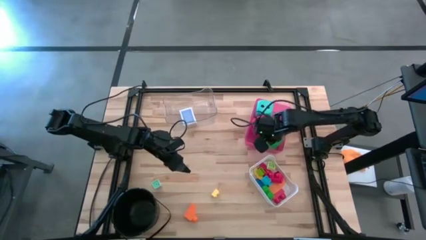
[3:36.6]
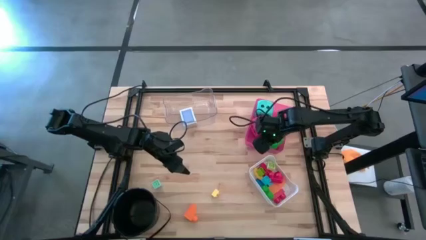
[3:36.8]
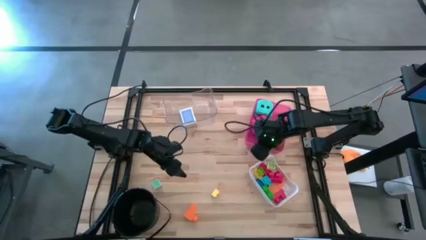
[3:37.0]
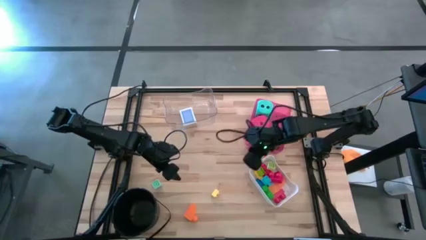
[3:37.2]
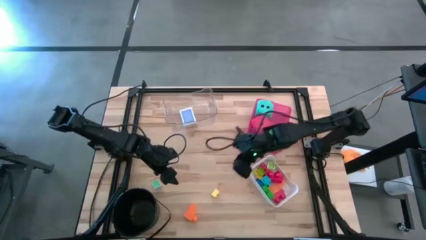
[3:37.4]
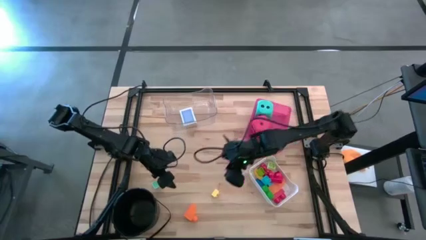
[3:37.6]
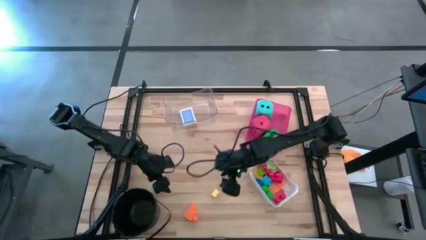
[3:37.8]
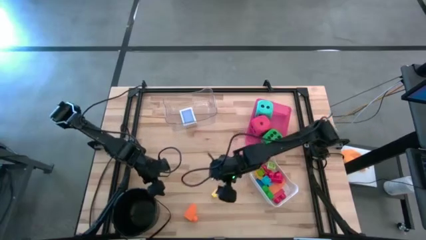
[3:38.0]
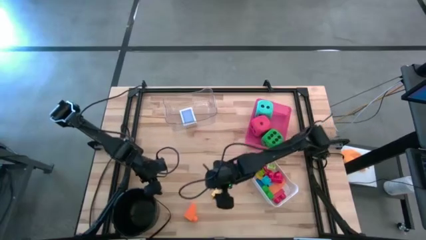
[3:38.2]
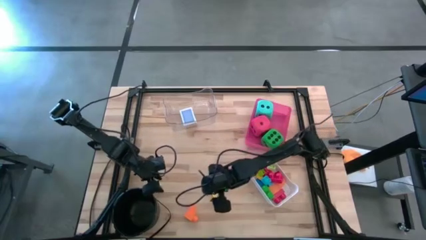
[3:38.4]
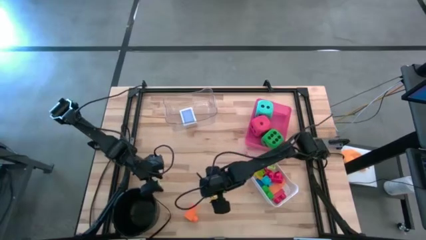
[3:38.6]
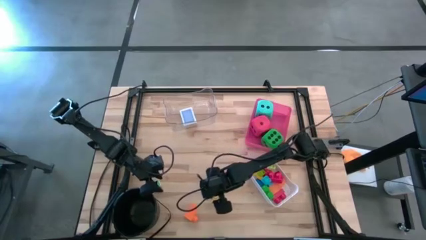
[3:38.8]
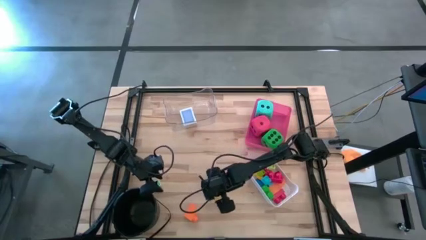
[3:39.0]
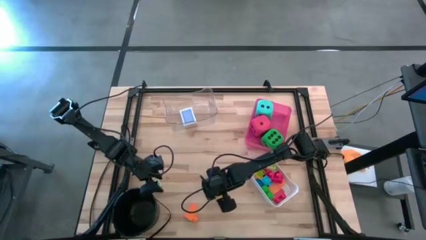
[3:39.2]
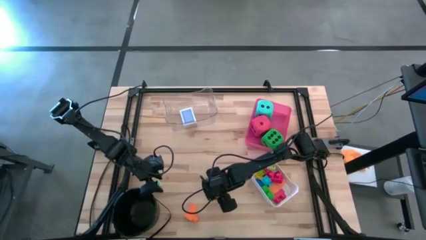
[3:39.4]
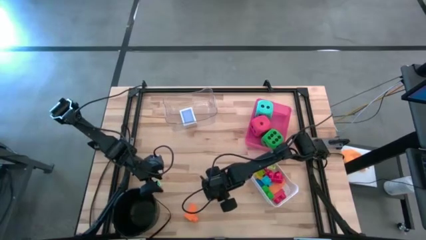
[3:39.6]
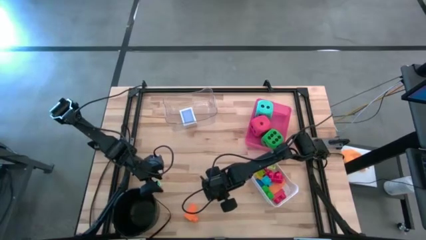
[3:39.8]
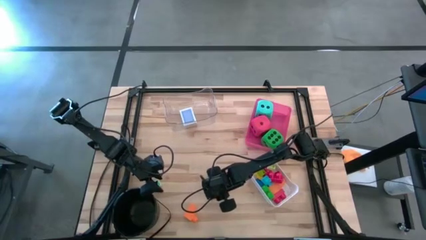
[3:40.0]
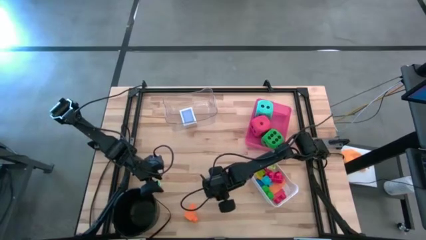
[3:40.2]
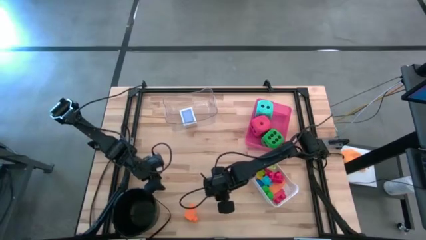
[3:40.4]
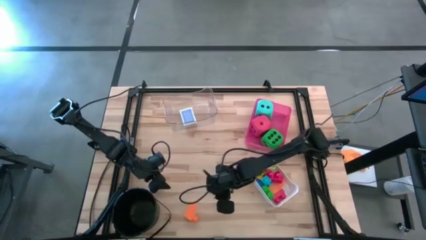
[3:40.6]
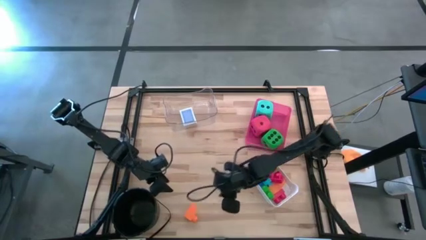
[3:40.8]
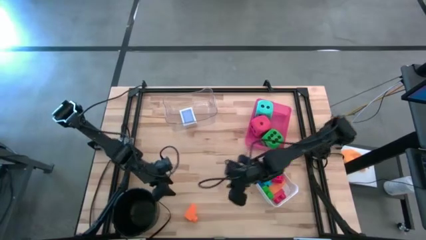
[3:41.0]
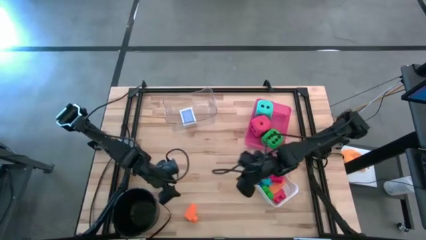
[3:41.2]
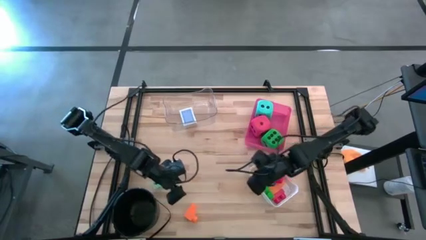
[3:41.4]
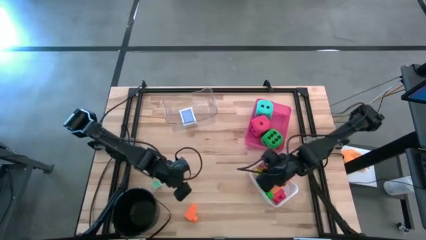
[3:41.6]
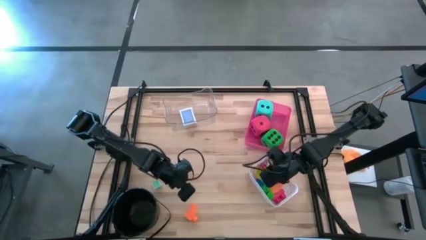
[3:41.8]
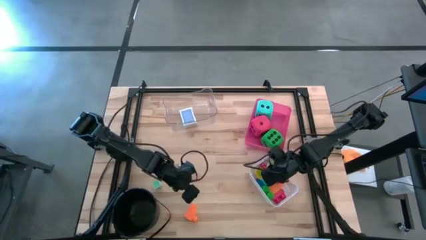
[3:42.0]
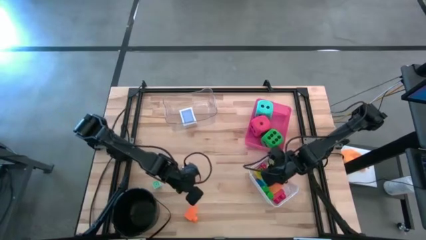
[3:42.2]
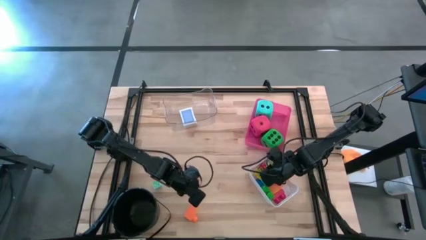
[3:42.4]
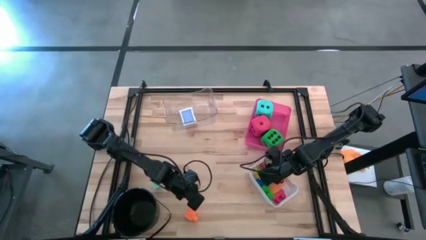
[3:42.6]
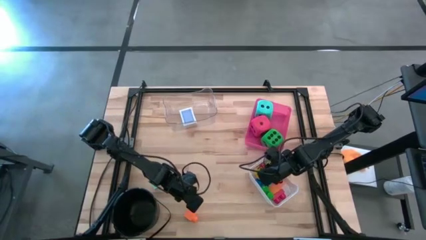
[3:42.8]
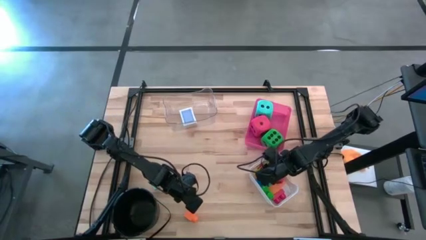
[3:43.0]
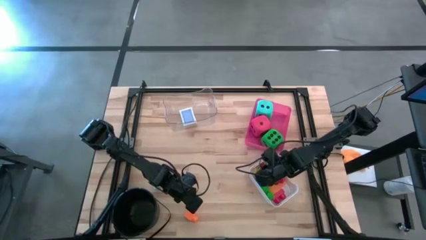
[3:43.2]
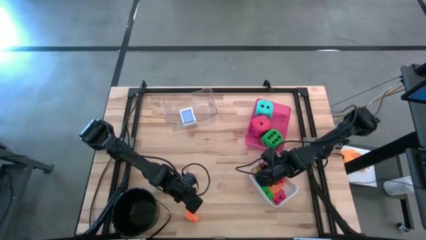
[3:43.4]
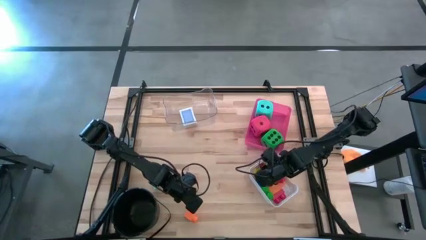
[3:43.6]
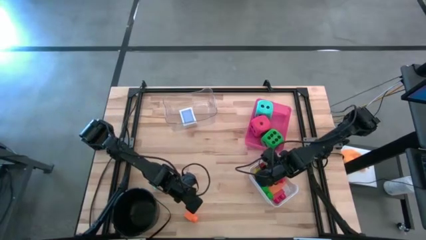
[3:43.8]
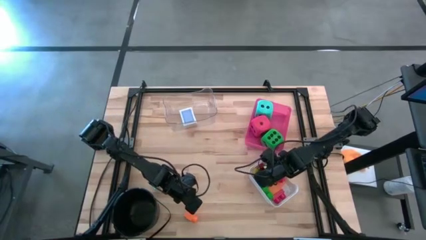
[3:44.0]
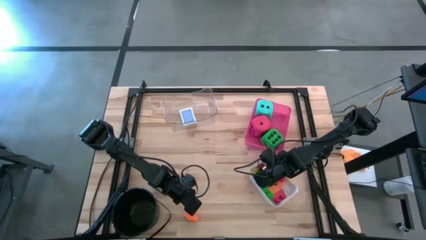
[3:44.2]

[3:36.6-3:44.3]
Task: Pick & Place Toys
Put the light yellow game piece into the white bin

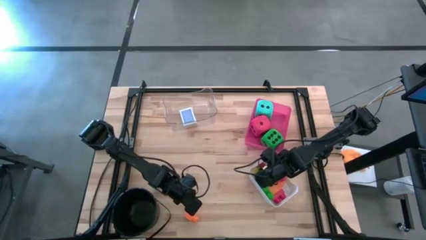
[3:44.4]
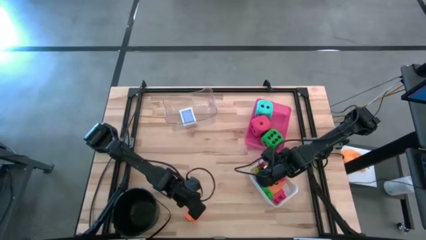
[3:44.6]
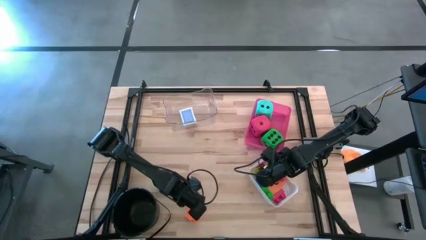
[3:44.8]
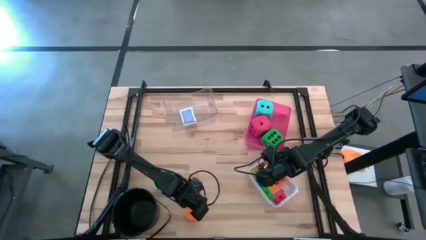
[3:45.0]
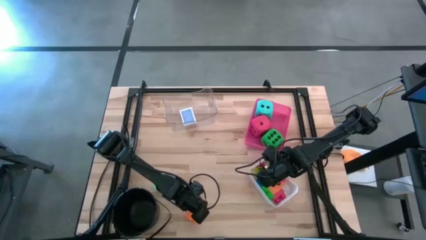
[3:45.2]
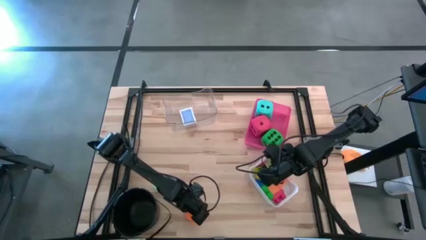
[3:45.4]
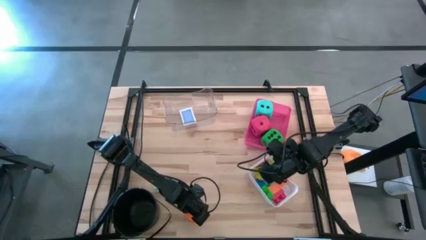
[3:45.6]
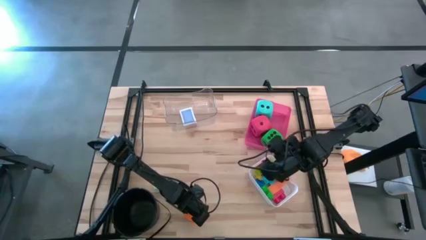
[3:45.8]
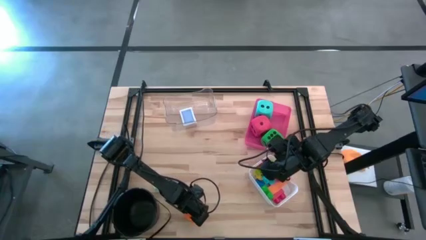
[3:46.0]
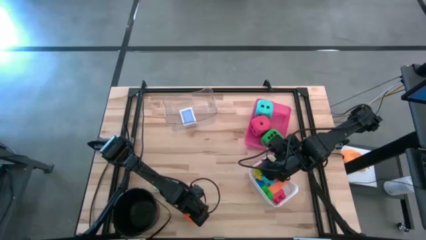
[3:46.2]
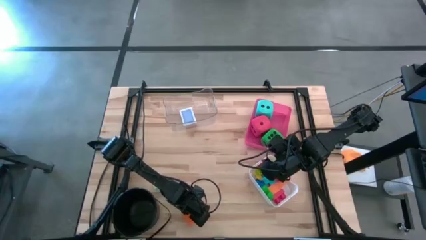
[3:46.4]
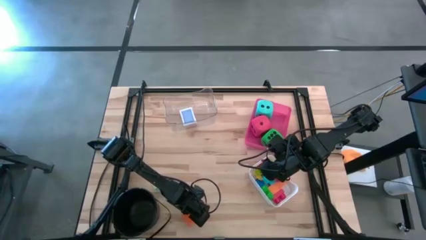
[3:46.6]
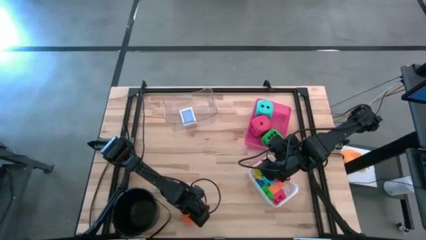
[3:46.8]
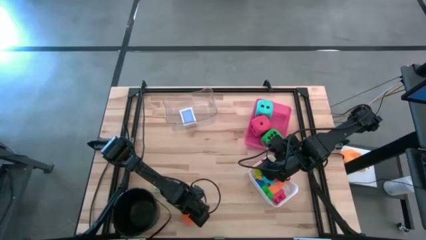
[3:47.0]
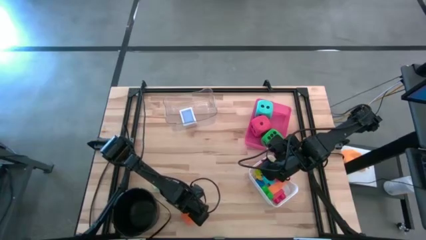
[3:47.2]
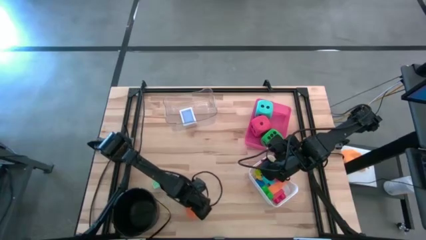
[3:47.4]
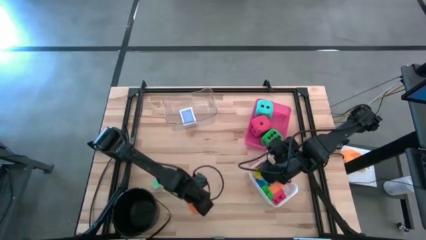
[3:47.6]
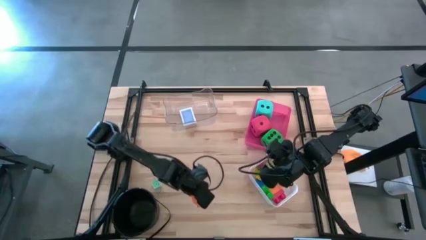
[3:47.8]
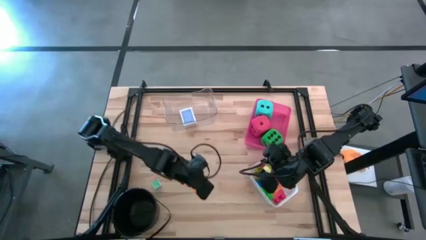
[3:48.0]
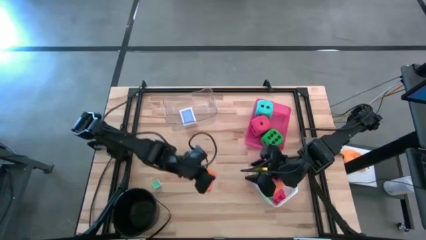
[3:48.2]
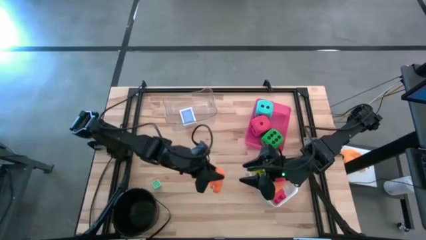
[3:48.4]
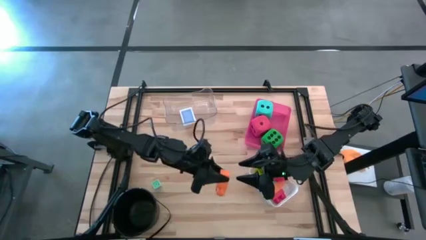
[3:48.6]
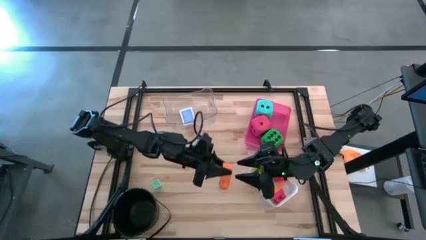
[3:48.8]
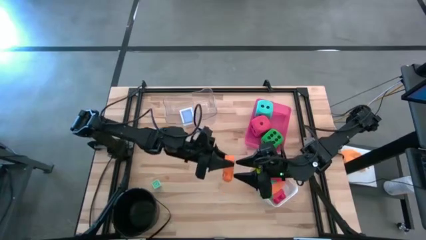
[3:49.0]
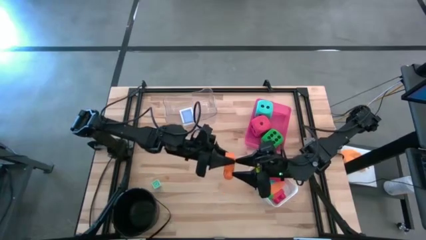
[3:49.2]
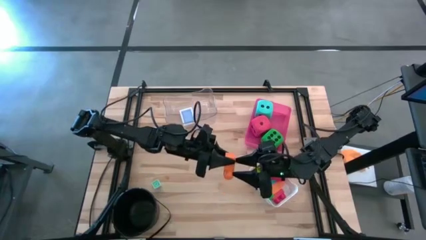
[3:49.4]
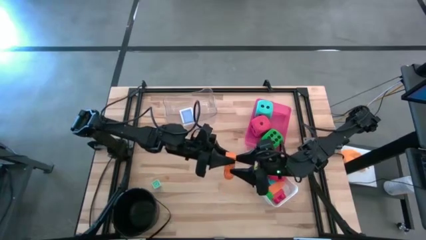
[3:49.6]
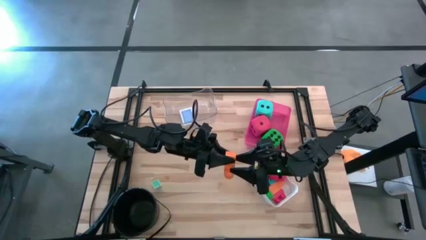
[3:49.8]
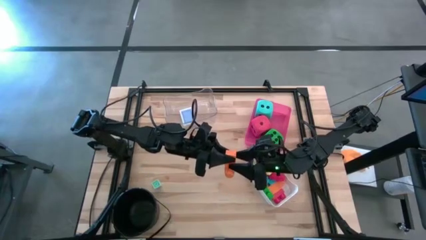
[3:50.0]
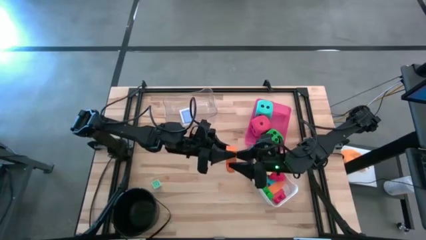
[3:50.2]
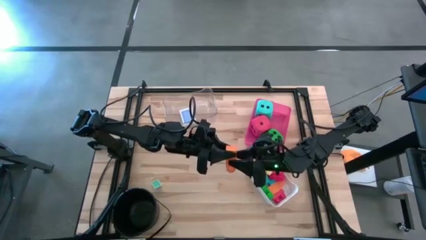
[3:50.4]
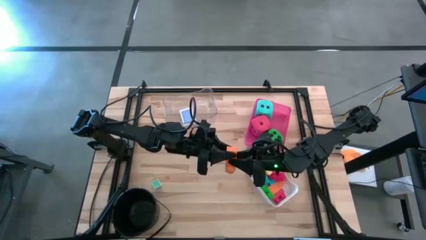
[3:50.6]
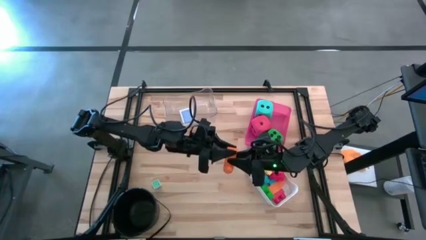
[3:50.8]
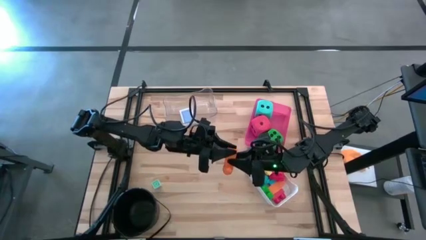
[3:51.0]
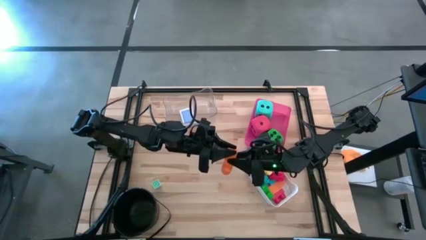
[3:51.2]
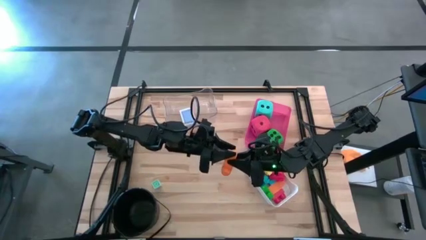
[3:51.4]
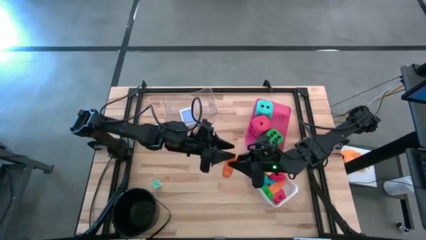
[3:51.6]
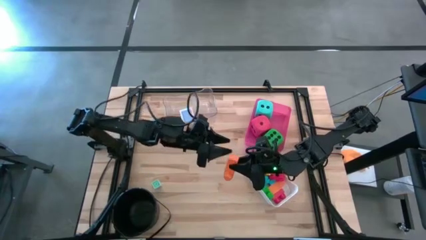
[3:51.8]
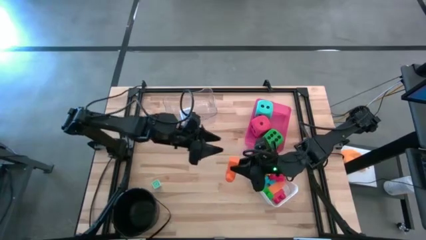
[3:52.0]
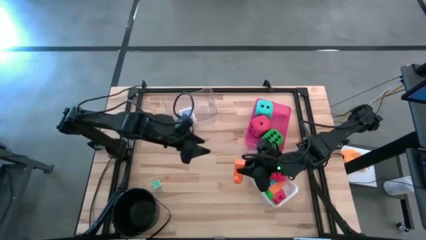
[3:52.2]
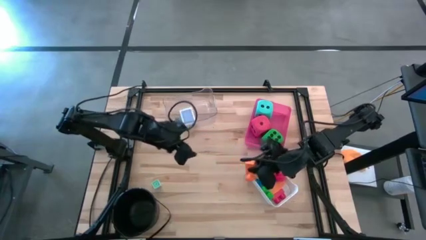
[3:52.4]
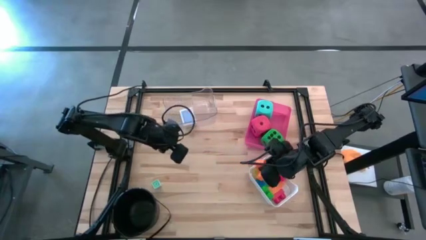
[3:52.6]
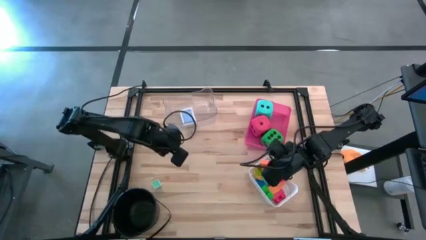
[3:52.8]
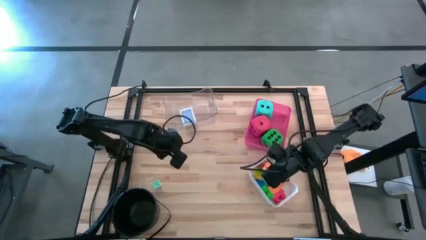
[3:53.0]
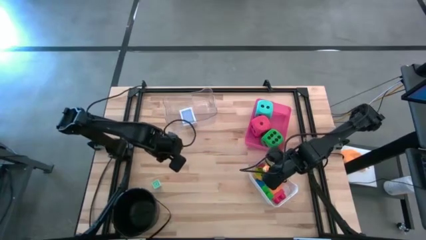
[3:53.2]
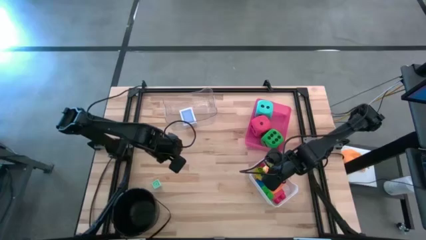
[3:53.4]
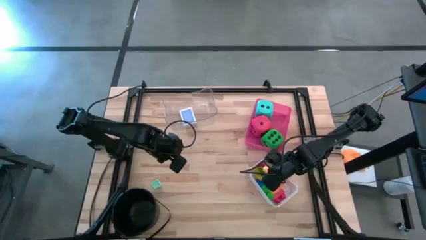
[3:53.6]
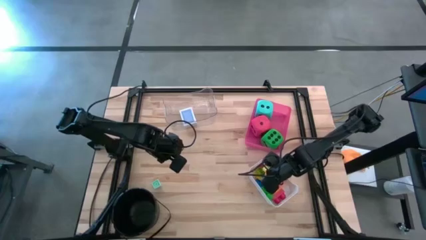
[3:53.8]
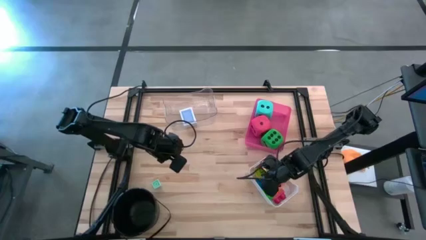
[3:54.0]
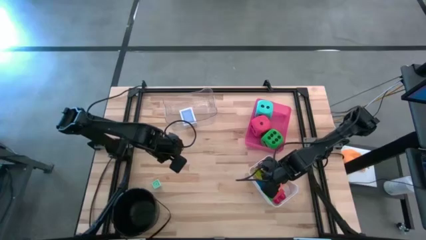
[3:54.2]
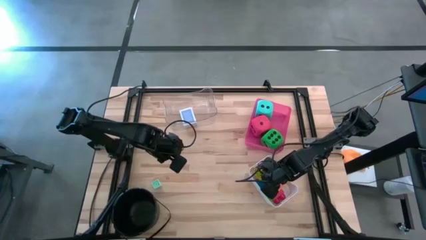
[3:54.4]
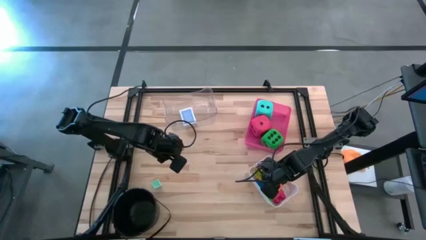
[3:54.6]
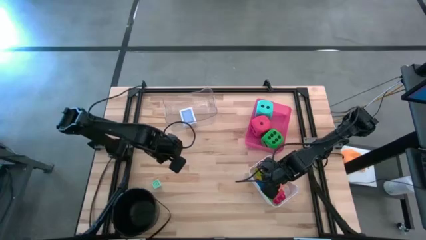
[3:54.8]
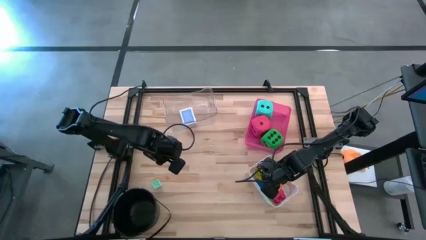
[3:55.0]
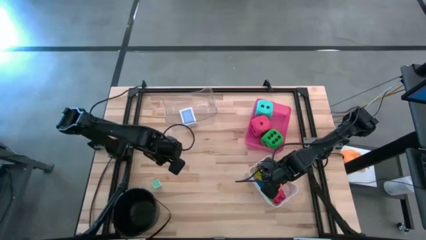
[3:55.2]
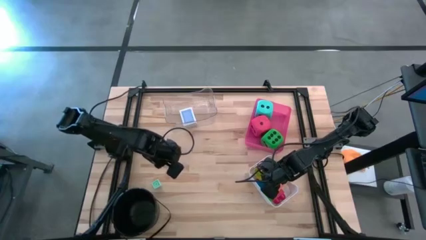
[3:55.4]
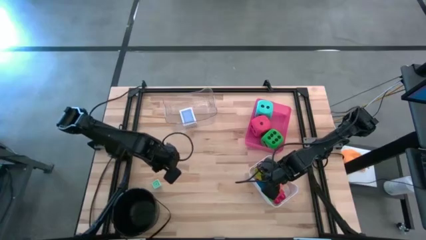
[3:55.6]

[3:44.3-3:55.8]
Put the orange game piece into the white bin
